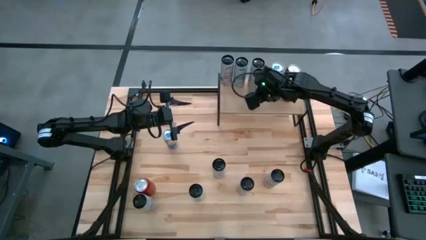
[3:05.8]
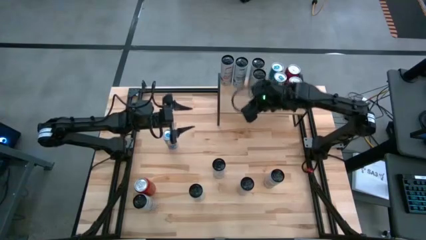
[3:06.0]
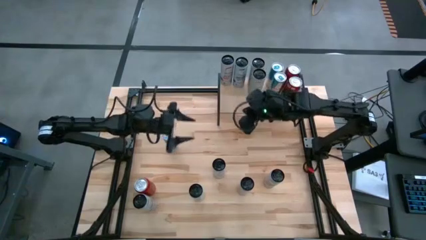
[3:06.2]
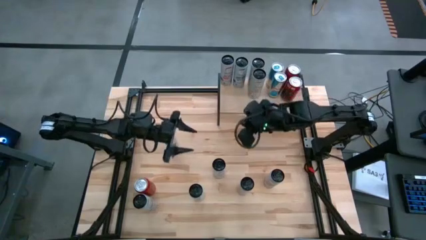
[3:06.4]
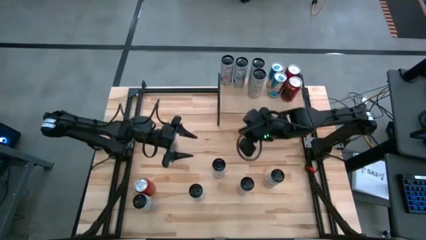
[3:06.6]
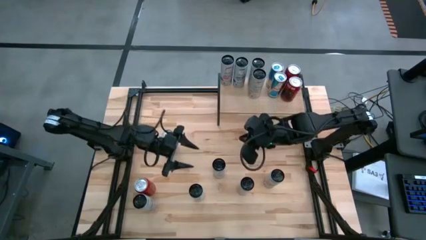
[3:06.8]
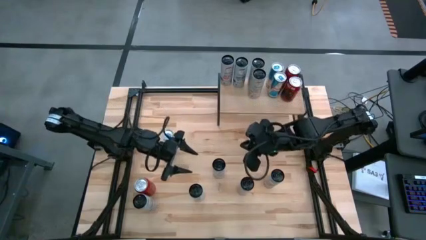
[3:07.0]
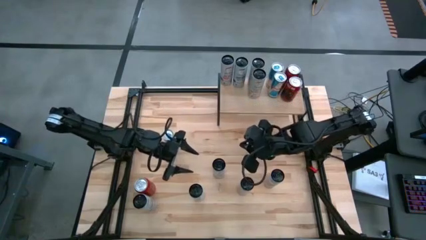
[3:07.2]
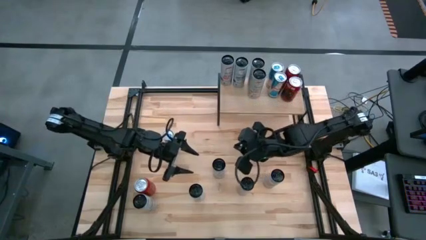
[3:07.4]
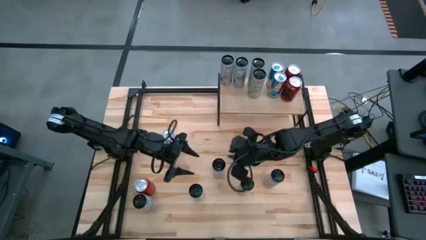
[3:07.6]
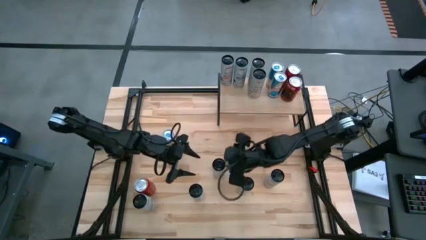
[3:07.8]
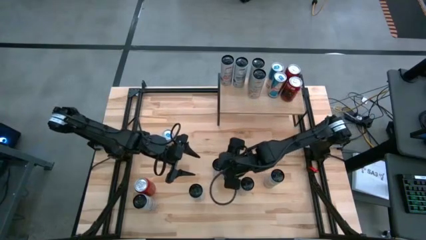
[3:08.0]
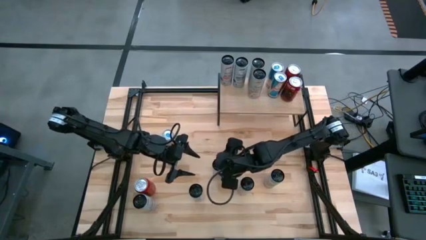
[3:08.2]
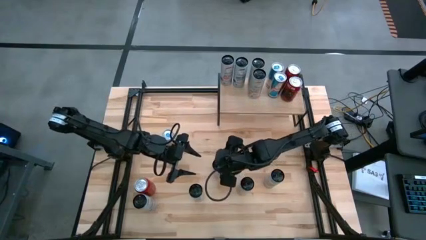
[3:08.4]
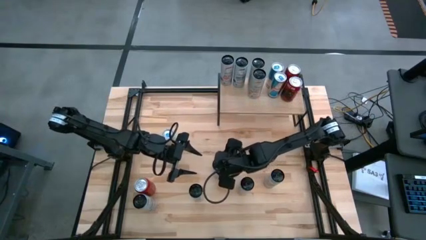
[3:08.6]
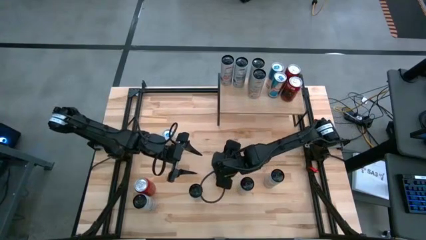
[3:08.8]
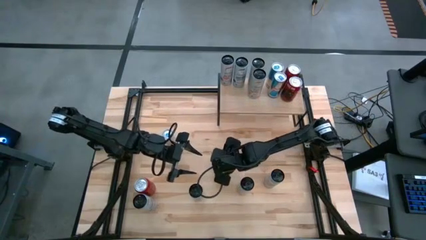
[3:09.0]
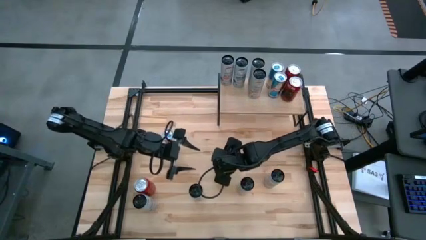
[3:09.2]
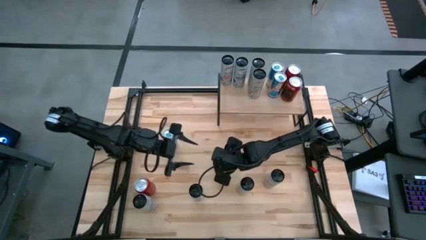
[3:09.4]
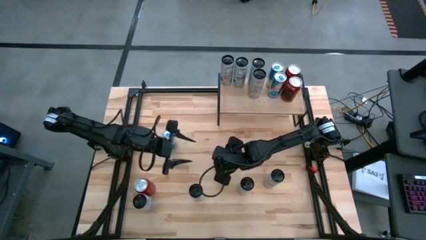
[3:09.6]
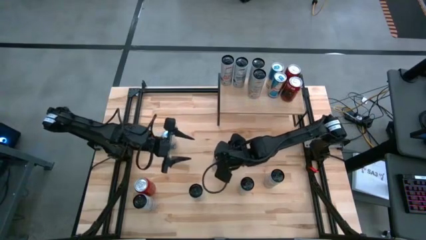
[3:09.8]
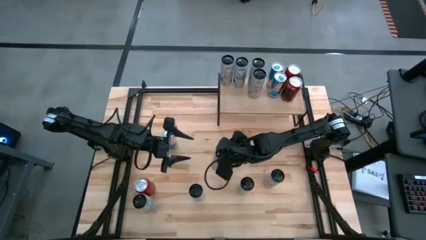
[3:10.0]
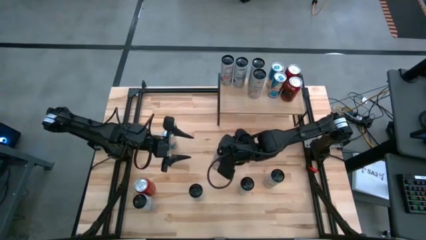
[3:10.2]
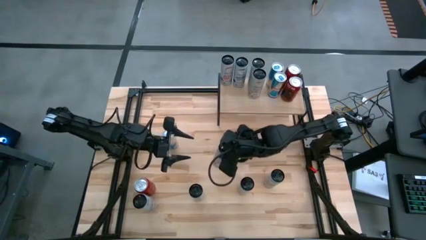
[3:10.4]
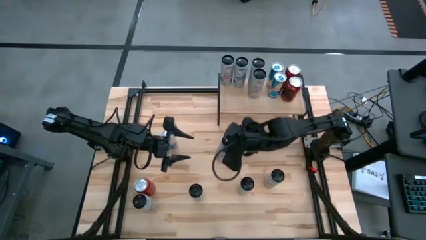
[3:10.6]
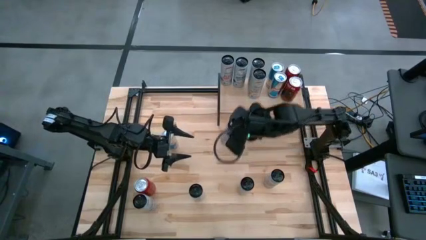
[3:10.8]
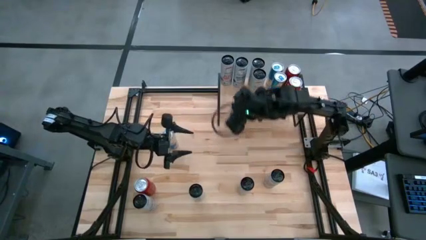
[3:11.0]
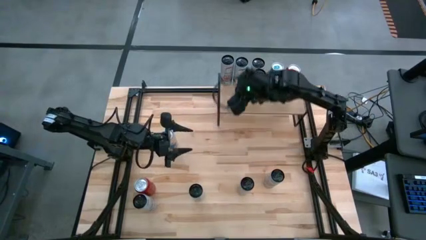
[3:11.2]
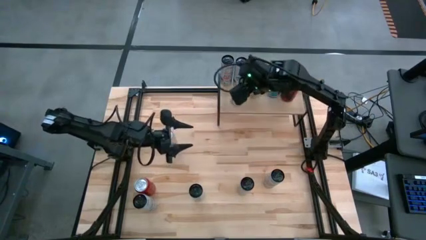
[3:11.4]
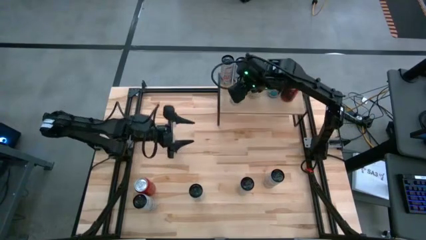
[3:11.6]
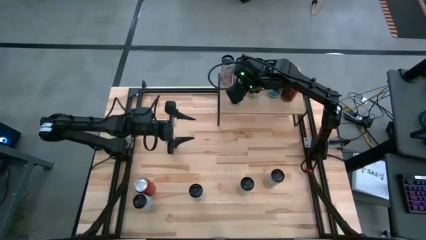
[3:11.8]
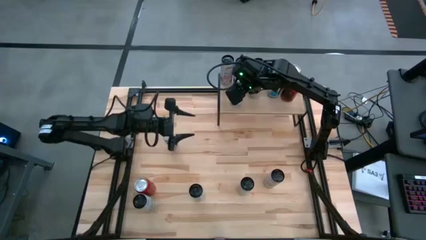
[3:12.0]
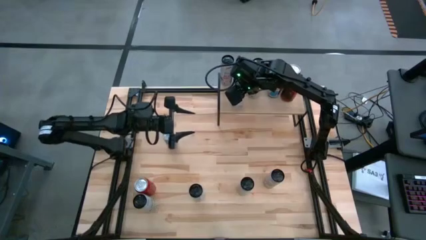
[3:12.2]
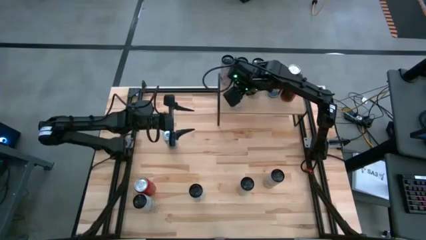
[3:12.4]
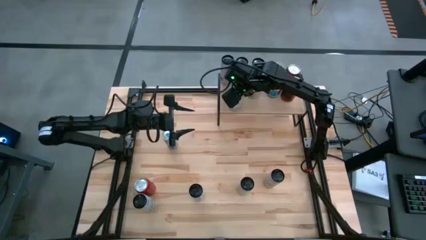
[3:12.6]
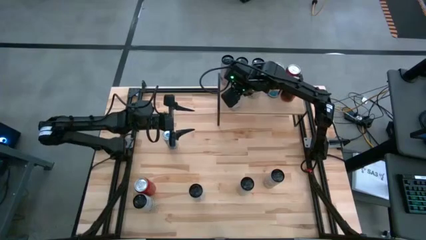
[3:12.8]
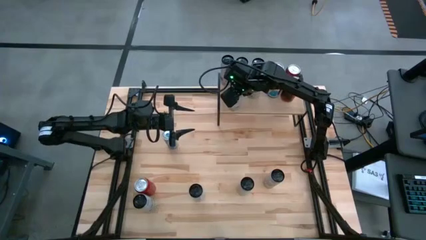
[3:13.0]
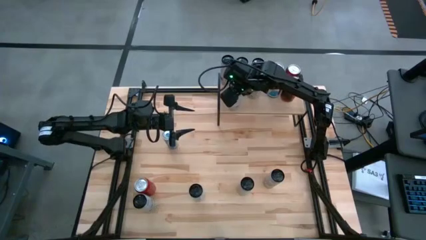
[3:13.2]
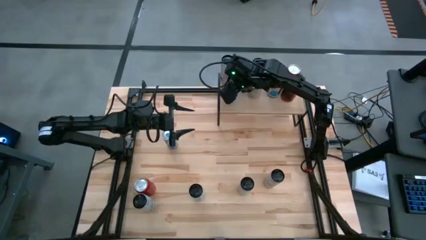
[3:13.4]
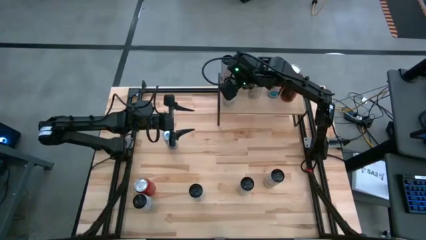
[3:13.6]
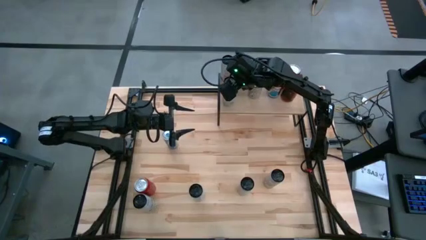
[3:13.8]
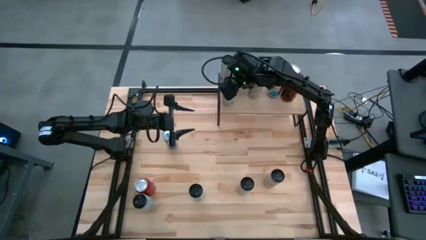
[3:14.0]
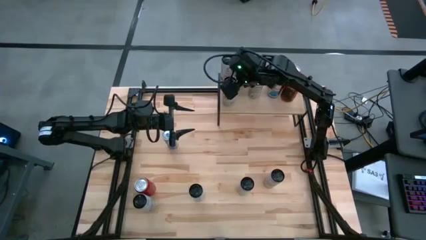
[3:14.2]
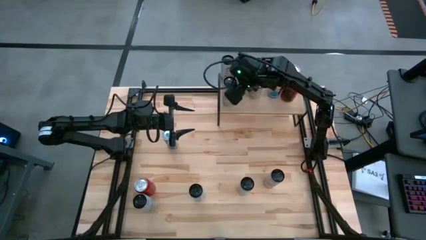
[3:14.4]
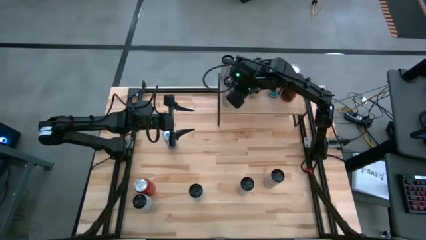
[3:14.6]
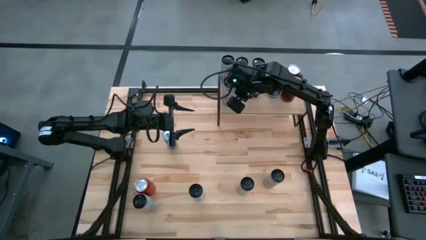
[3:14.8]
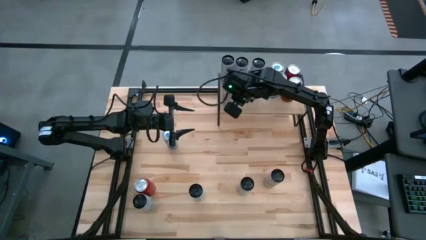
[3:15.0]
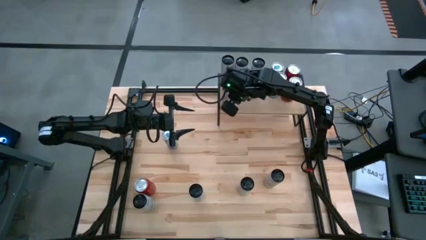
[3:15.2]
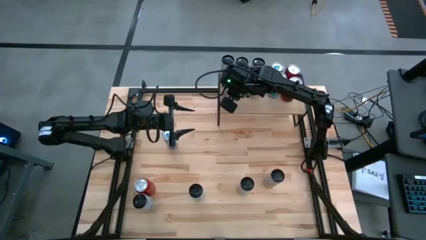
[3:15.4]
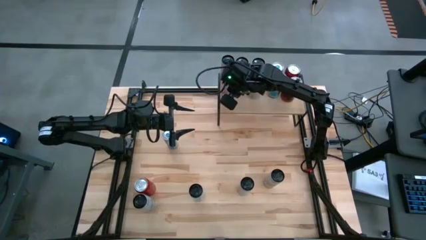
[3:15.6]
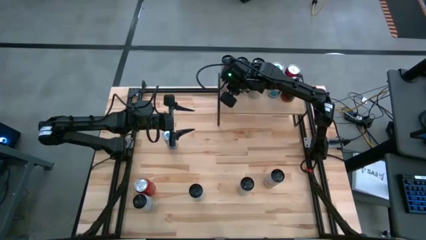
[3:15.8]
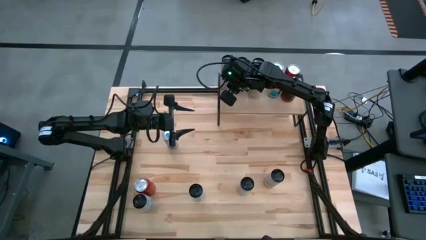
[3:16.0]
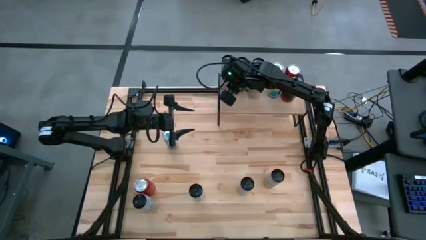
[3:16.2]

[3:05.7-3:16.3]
Task: Place canned beverage on shelf
Put the left white pink soda can on the shelf aligned with the other white pink soda can

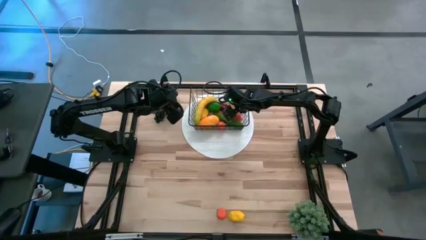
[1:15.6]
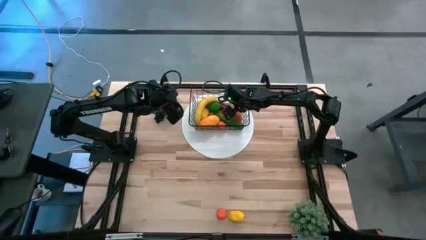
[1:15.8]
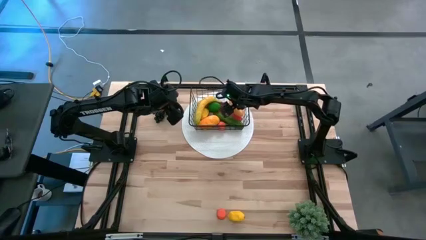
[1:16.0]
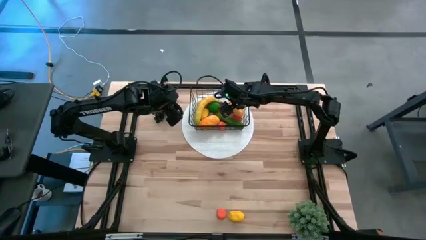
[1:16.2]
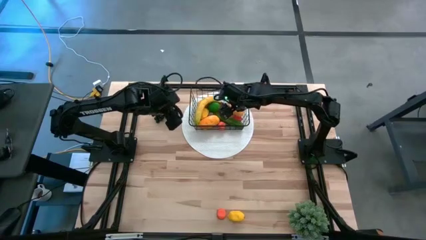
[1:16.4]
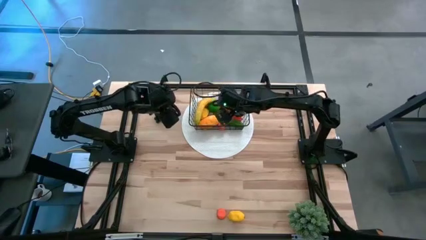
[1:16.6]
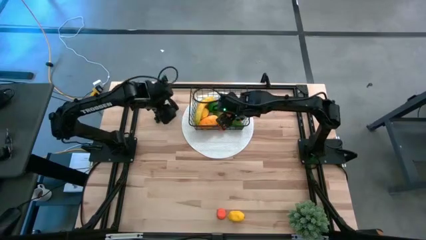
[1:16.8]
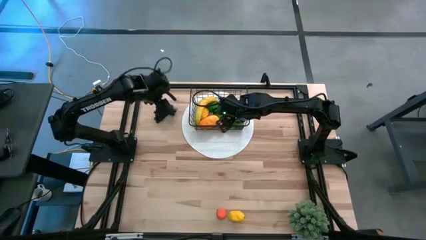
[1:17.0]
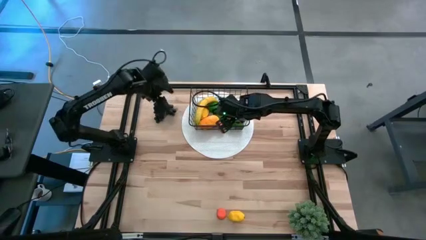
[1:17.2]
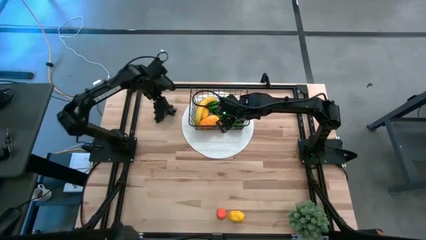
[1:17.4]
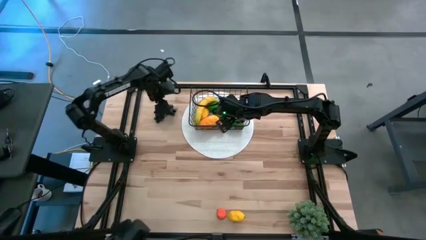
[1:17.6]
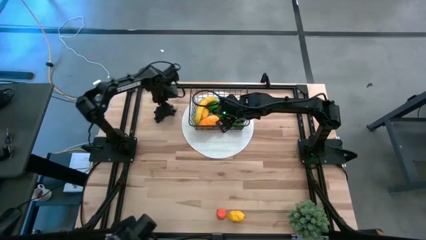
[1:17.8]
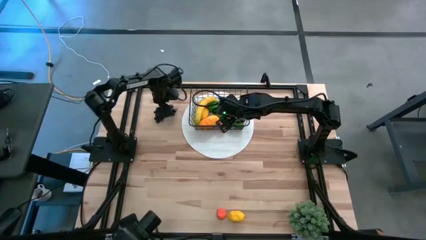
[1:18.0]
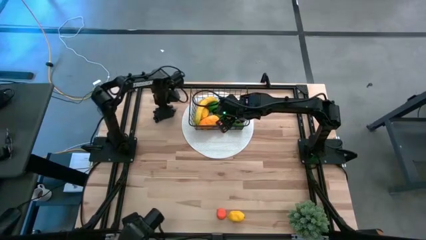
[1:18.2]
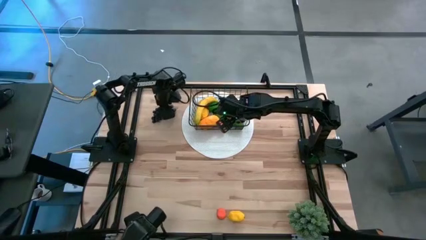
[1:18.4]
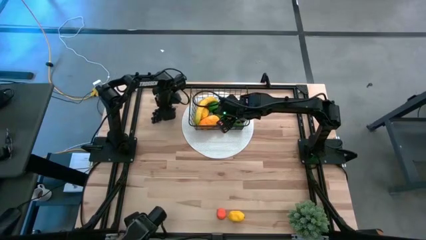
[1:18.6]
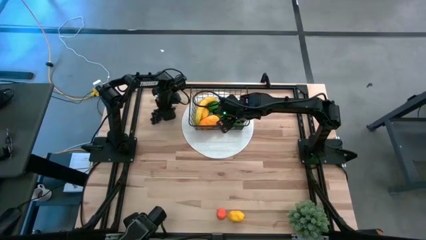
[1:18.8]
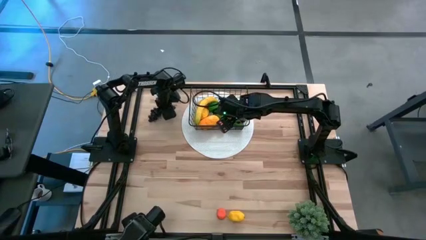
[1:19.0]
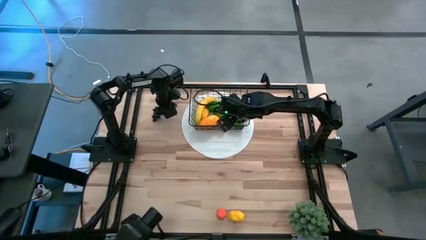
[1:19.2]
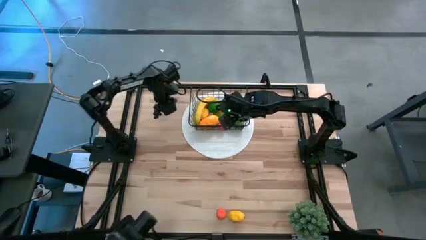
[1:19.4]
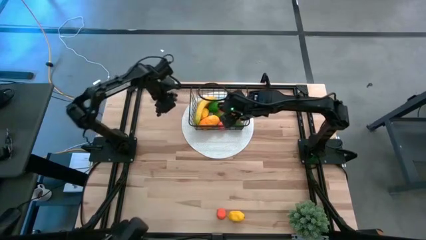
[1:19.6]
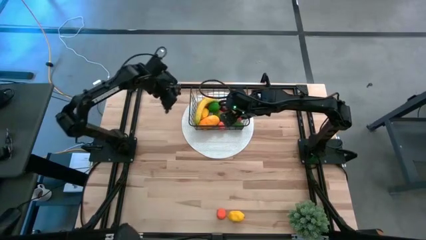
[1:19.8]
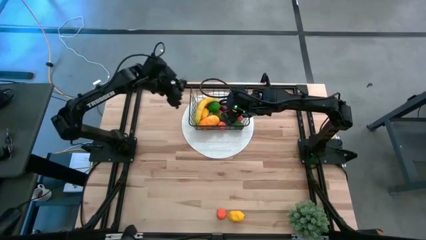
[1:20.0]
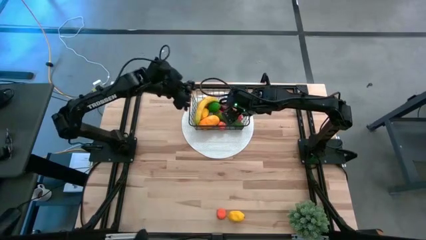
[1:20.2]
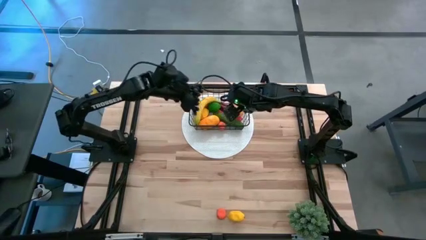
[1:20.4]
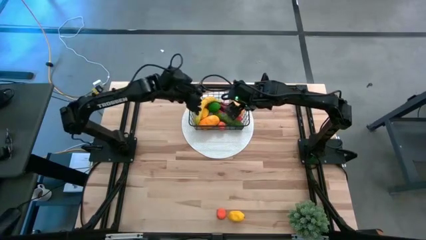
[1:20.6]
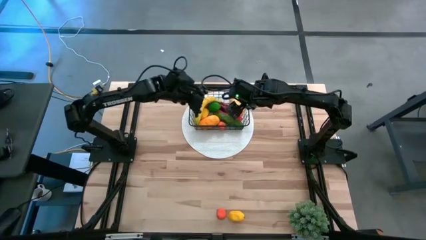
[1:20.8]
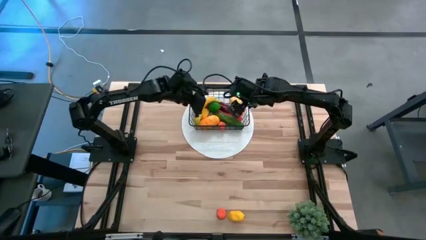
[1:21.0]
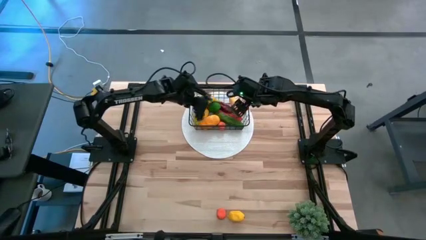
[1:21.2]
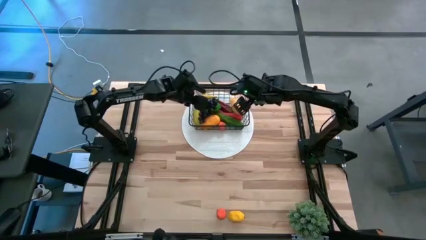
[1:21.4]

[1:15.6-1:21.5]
Task: Build produce basket
Put the black grapes into the black wire basket
